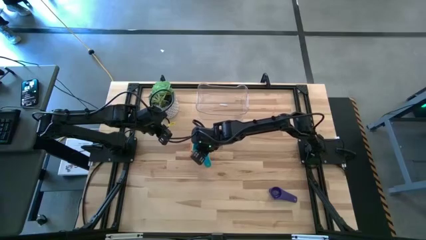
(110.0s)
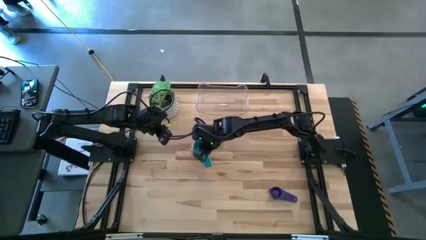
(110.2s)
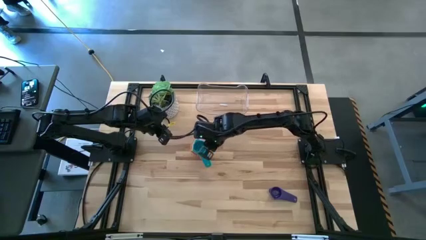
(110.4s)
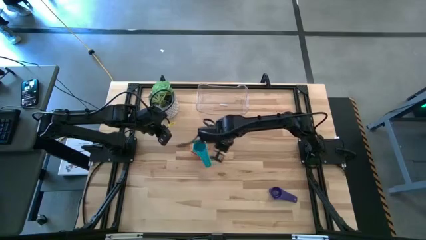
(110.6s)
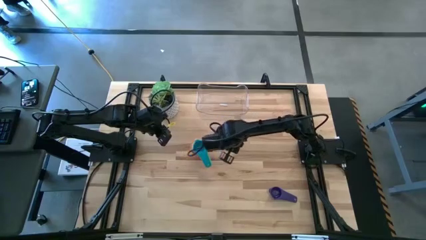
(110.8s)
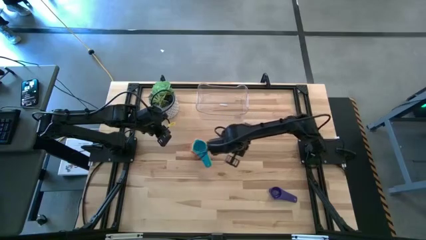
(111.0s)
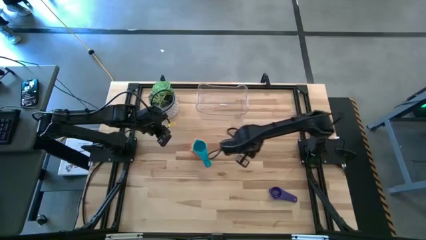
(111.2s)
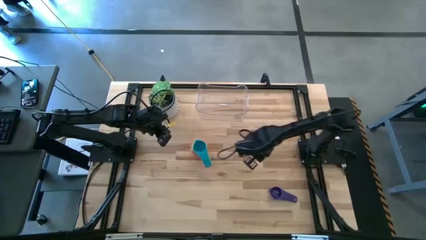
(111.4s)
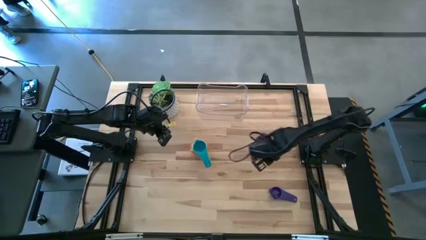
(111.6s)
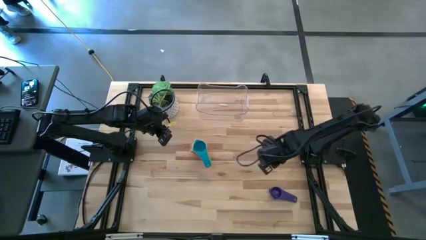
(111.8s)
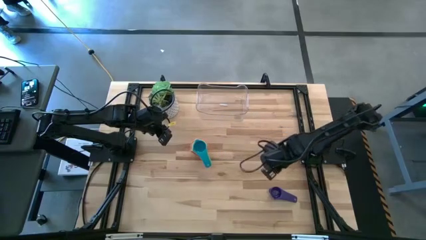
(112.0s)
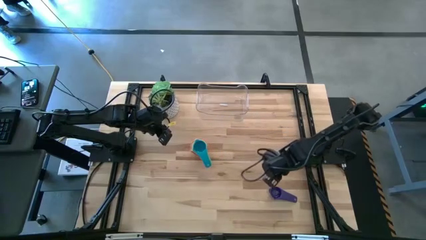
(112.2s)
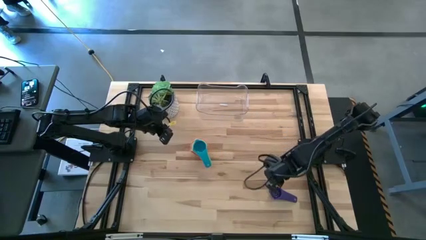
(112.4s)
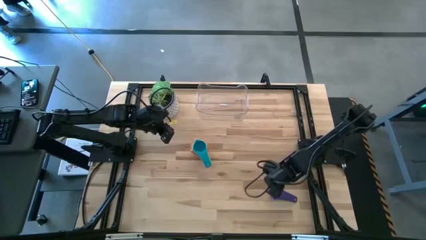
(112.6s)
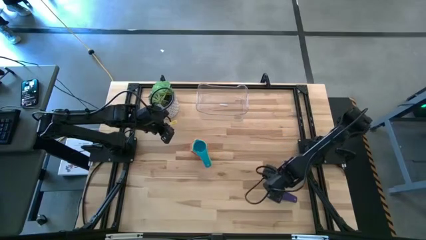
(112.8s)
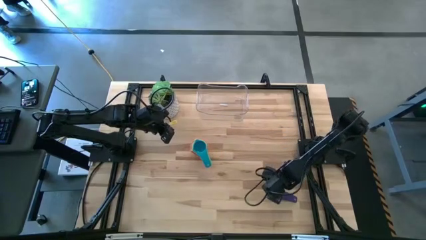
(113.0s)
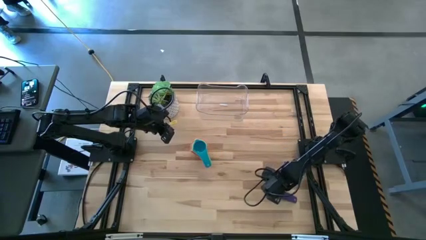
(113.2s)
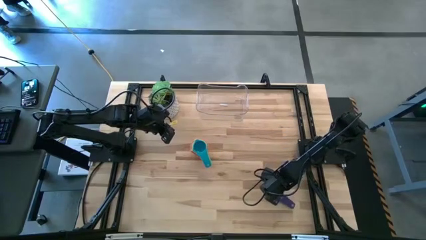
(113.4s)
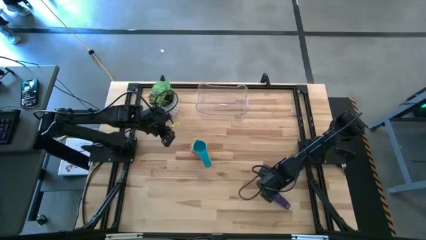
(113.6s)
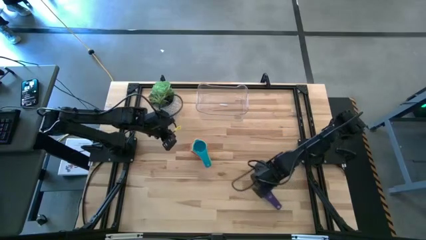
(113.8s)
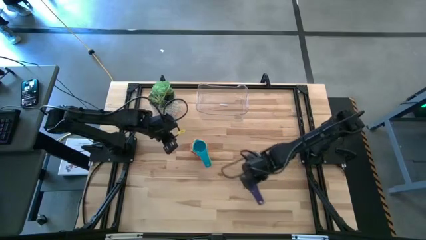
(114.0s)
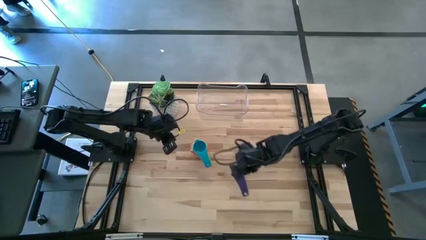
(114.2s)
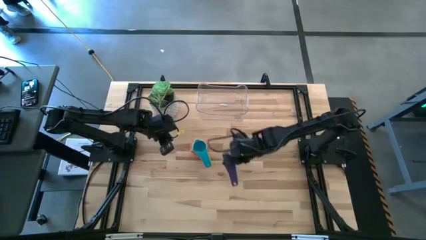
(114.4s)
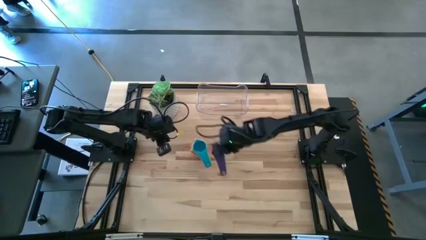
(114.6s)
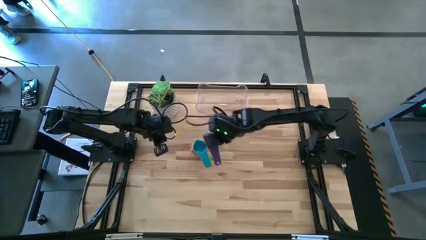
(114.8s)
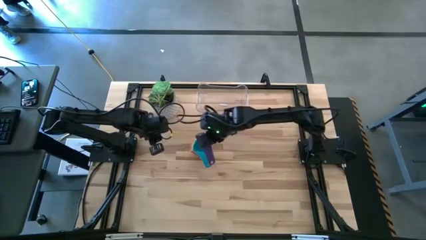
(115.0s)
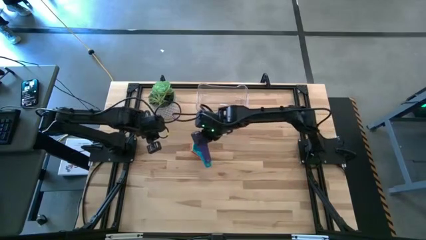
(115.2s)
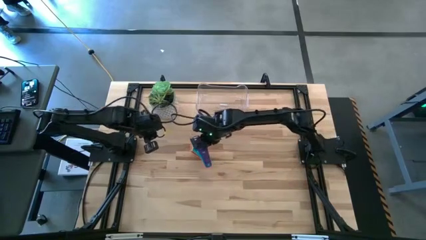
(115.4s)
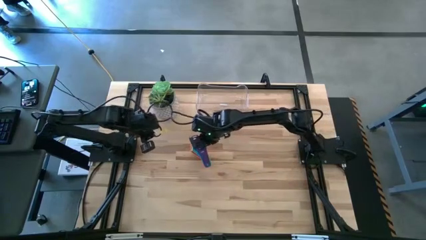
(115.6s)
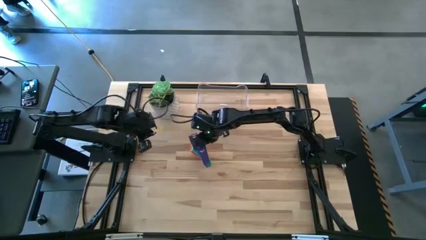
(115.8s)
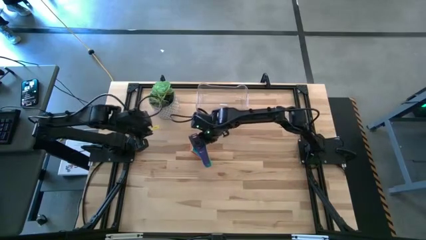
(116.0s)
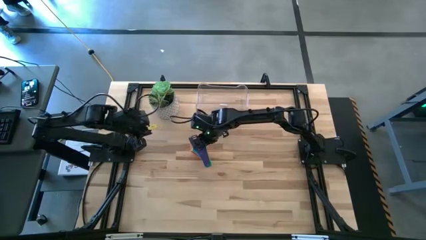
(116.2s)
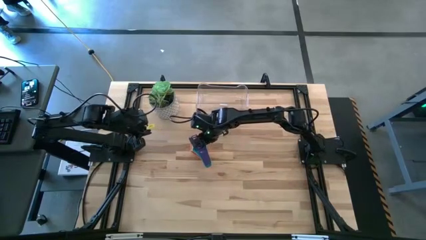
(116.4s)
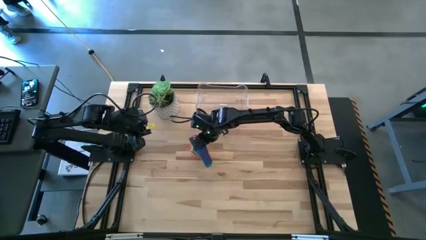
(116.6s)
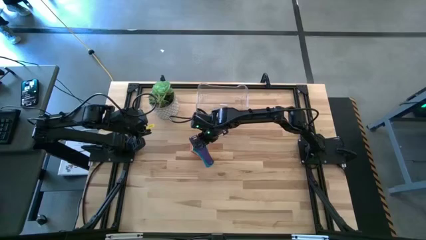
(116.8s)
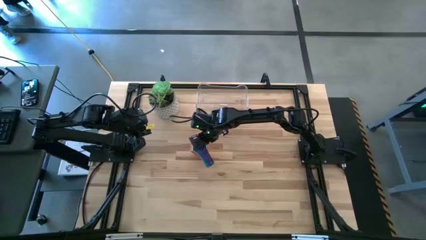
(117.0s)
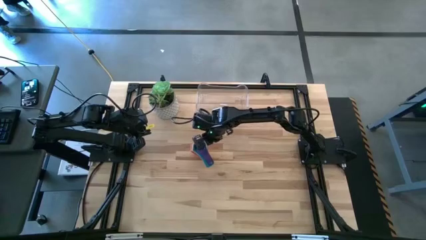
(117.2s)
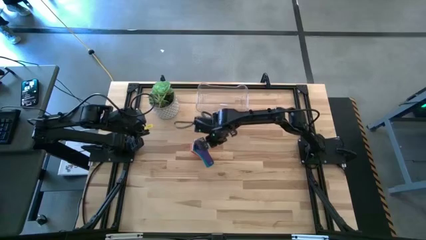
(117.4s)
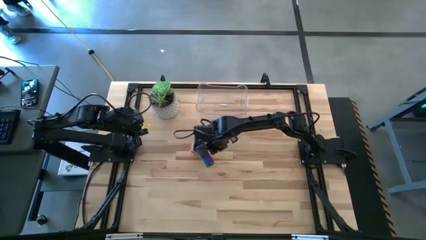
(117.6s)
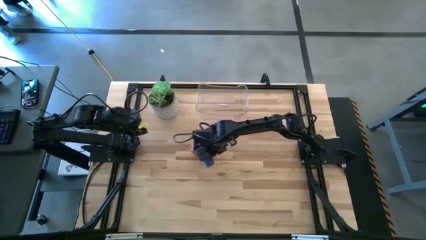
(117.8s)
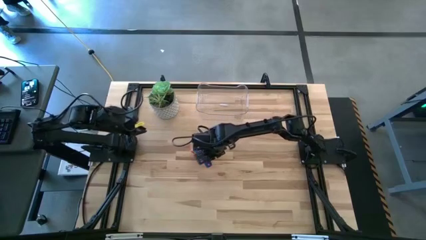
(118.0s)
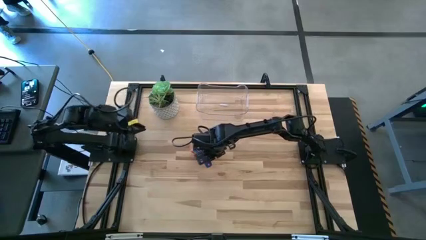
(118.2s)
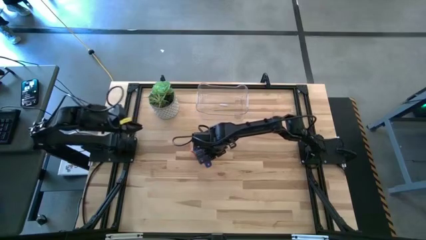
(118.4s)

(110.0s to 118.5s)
Task: Nest measuring cups in basket
Stack the dark blue measuring cup on top of the light blue measuring cup

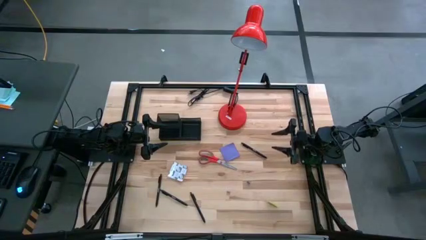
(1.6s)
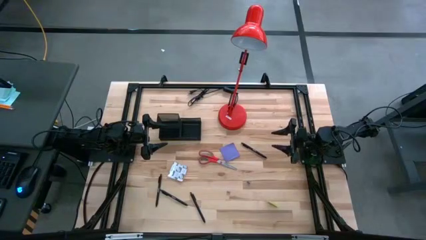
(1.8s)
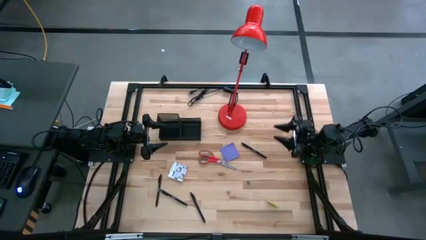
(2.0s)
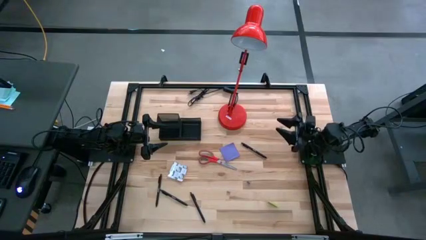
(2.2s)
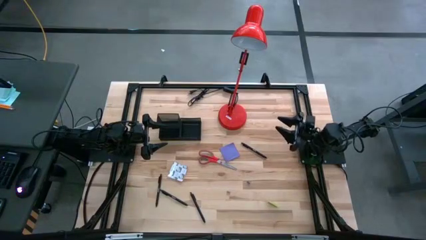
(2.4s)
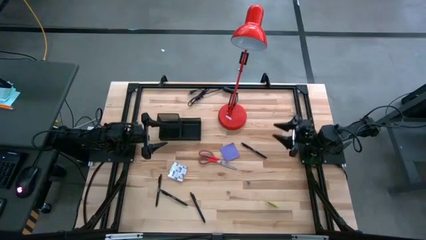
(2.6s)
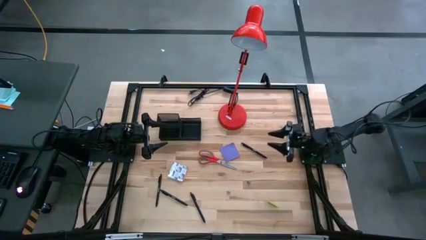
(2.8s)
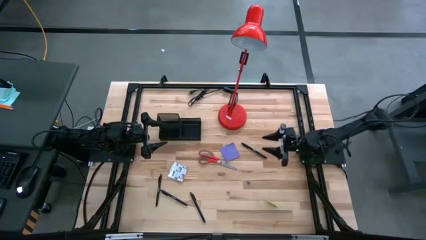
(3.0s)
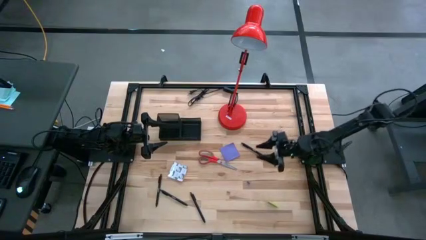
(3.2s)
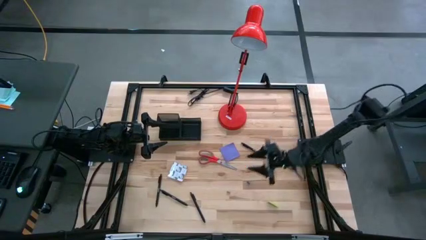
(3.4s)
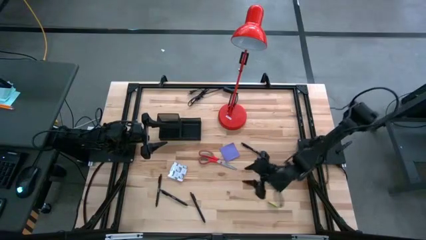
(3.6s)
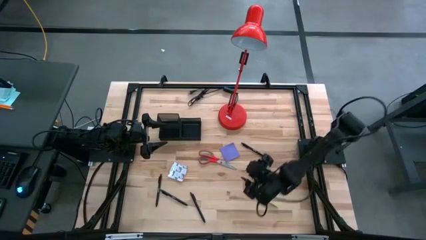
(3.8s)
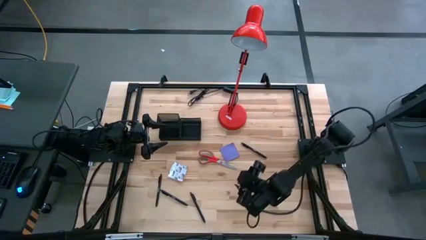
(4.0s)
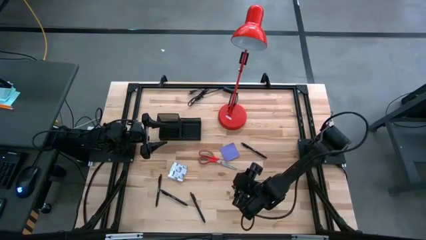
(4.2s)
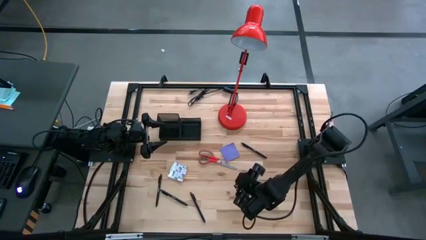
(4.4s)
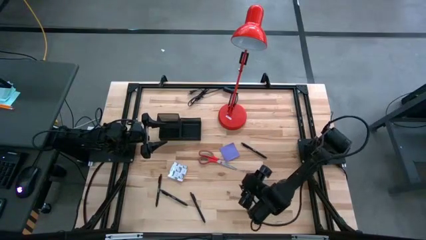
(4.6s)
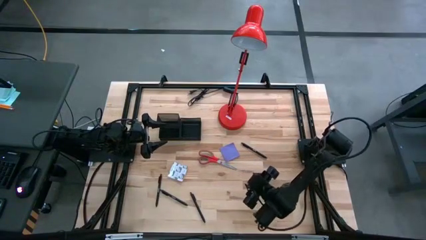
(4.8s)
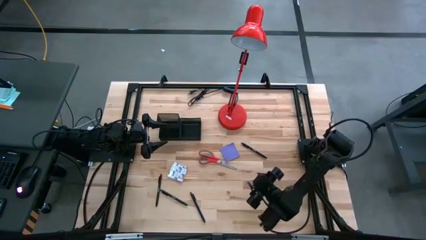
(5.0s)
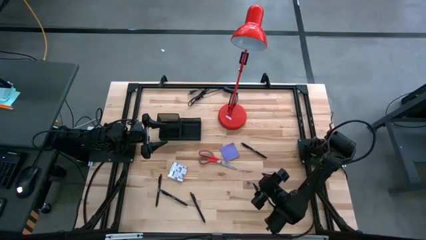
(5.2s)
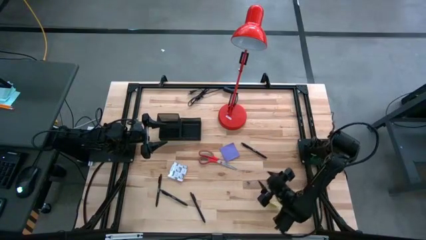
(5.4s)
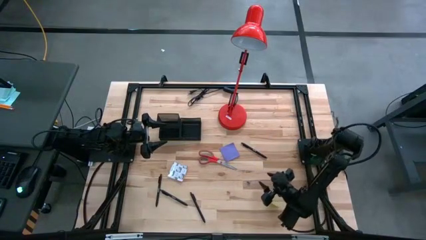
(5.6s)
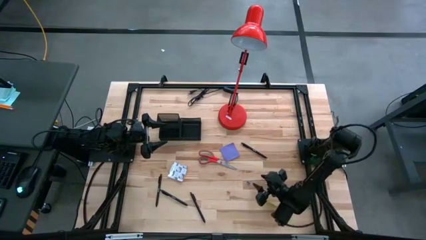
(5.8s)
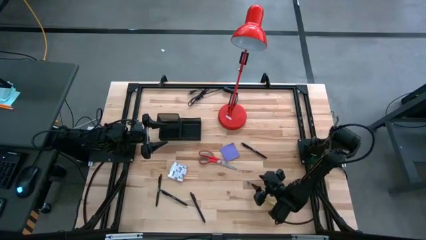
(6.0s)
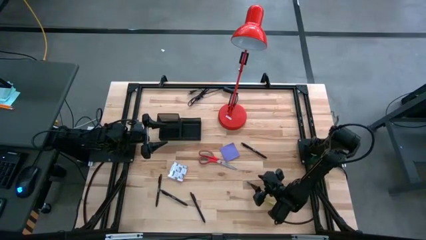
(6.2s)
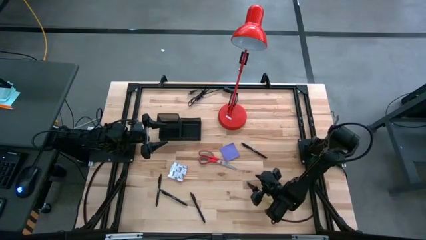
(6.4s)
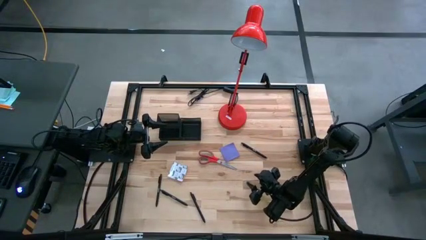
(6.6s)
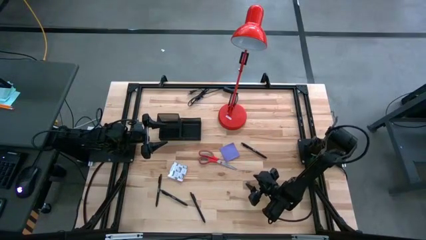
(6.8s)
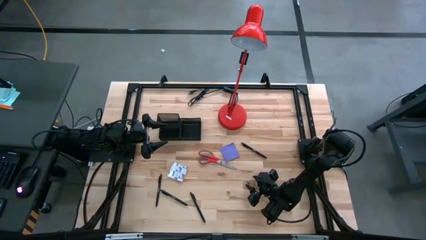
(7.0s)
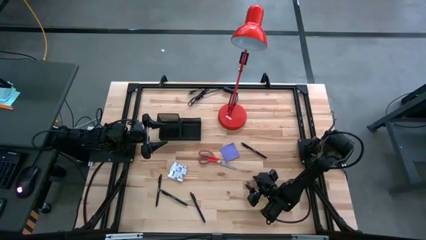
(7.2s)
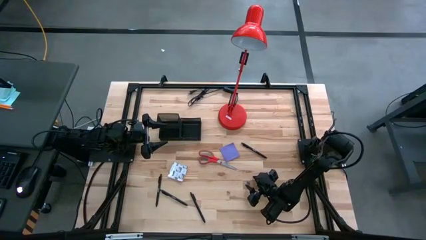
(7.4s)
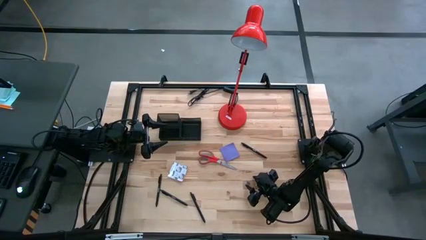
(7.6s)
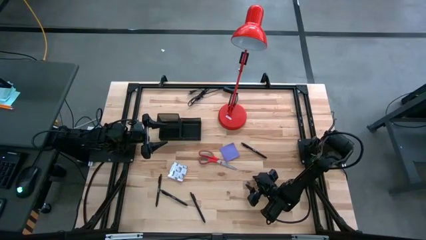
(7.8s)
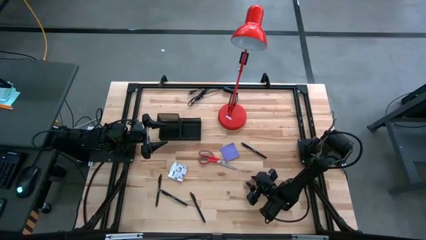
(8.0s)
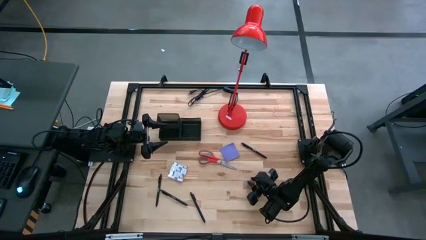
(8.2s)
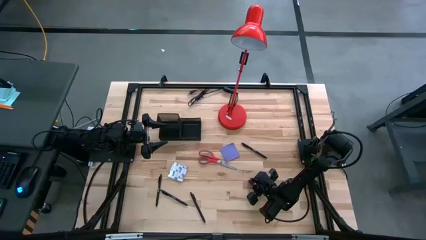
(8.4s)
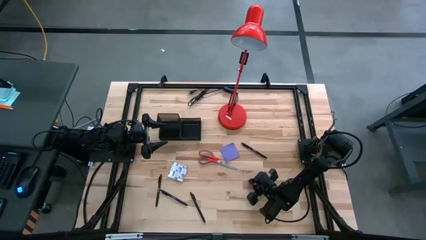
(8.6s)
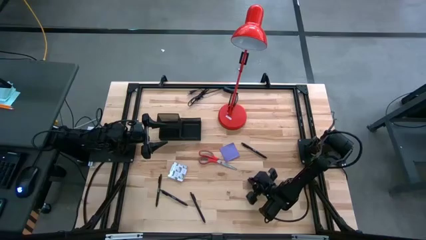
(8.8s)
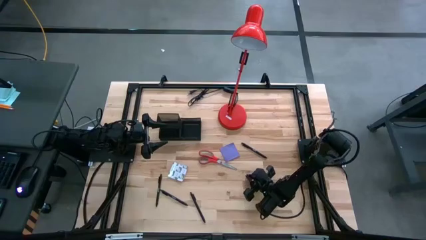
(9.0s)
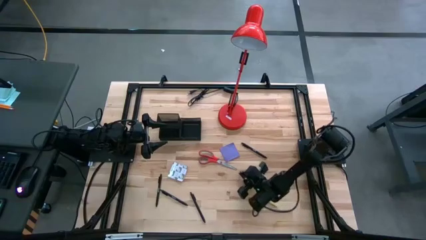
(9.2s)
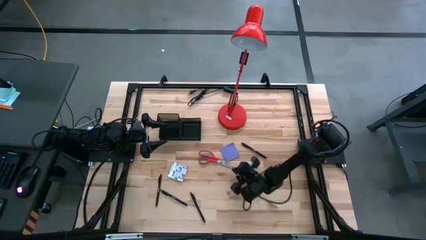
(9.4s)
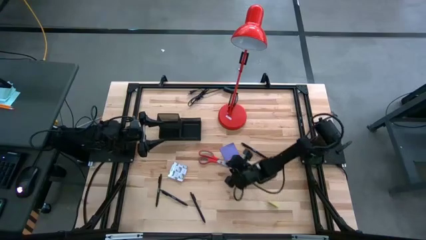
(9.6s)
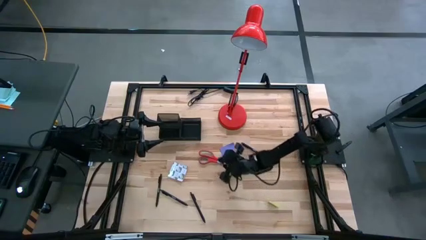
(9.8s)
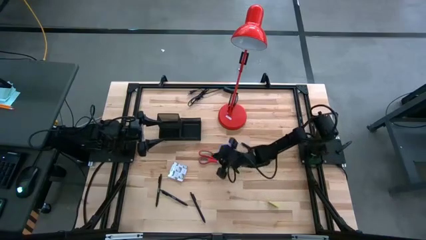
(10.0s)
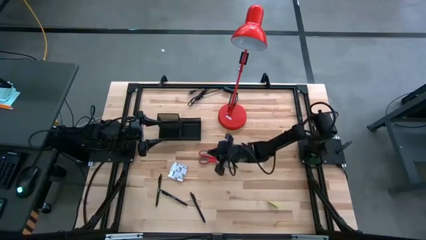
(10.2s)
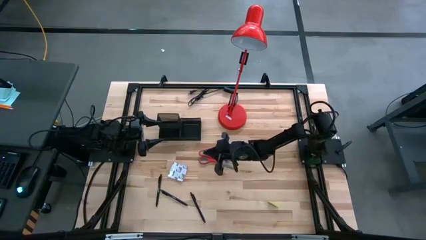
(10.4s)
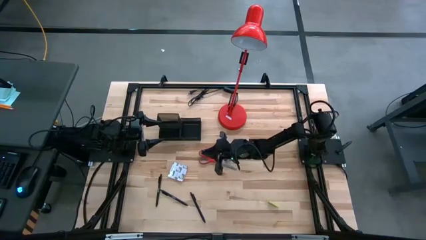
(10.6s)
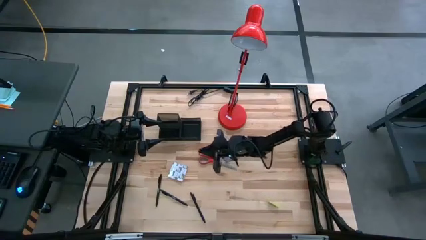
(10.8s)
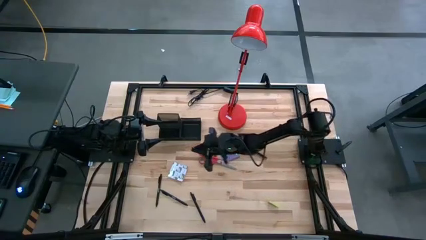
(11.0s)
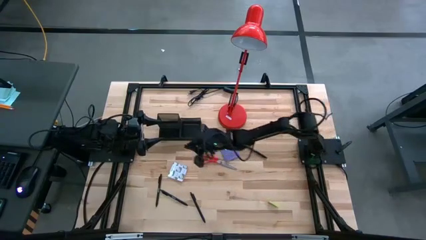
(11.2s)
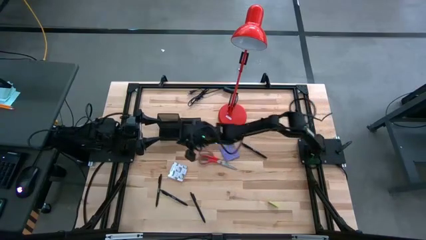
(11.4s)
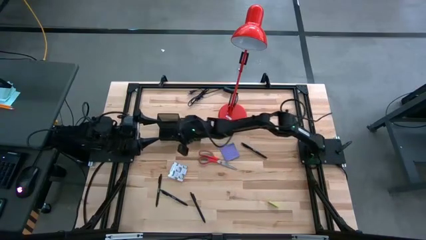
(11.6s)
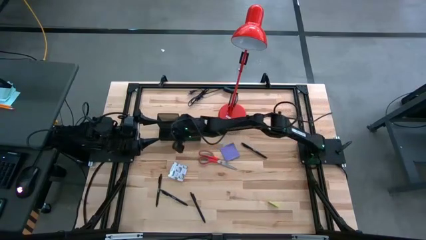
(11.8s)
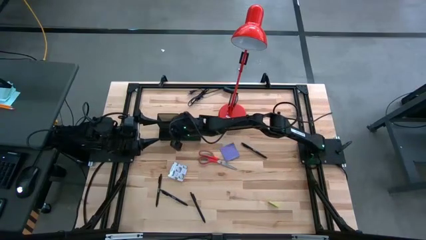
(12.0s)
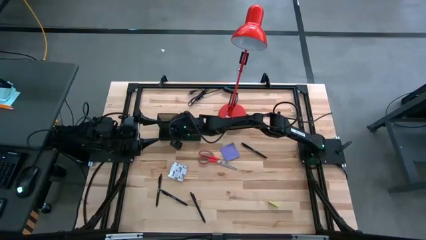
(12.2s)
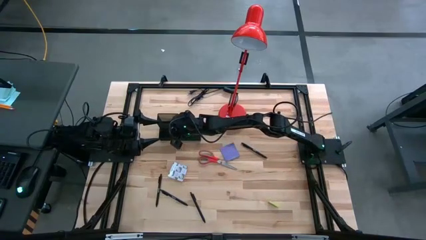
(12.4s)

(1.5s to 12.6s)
Task: Pick and place office supplies into organizer
Put the blue binder clip into the black desk organizer
